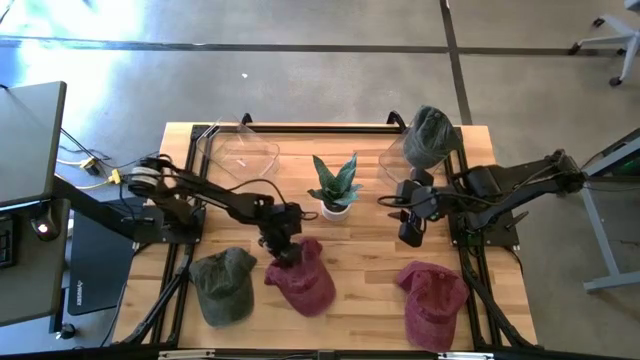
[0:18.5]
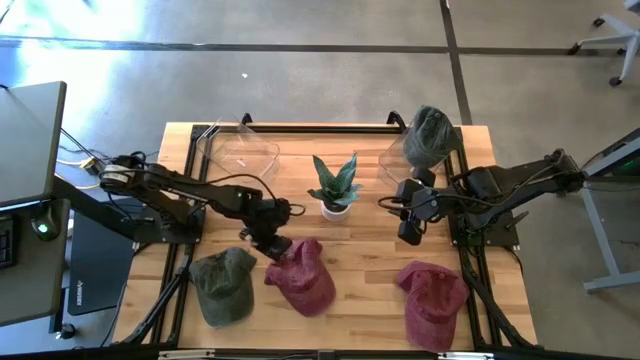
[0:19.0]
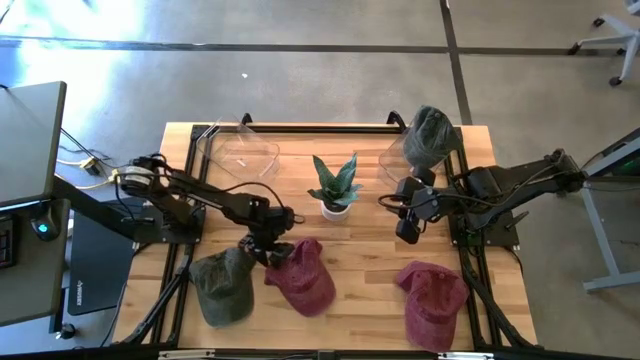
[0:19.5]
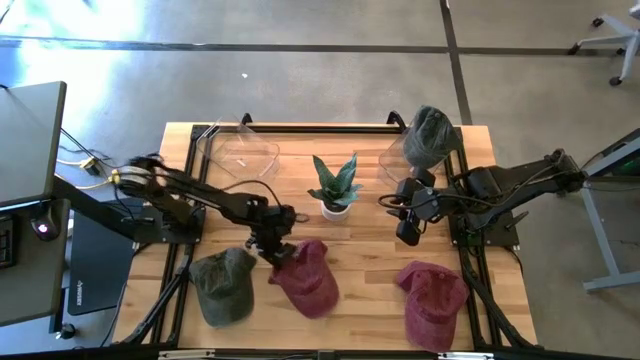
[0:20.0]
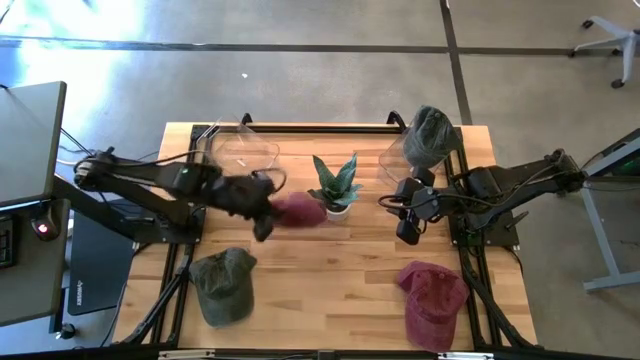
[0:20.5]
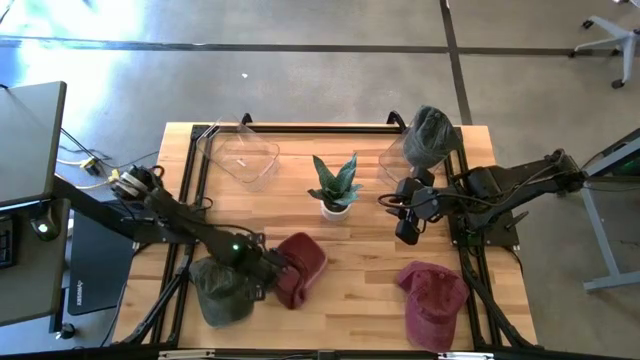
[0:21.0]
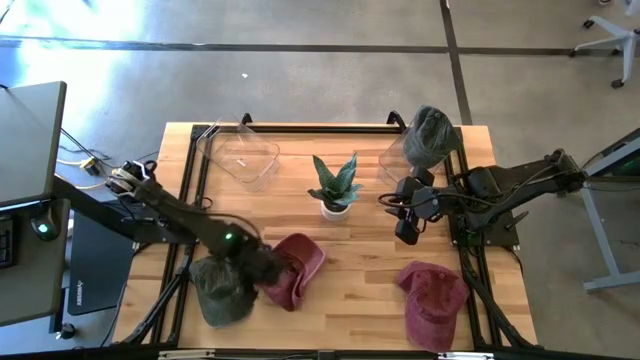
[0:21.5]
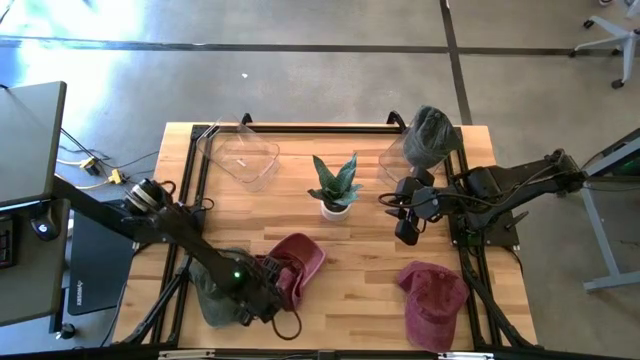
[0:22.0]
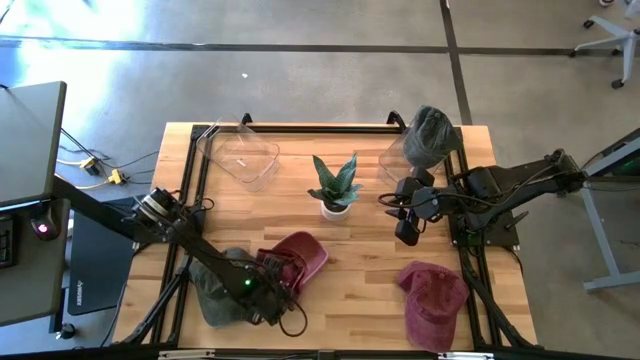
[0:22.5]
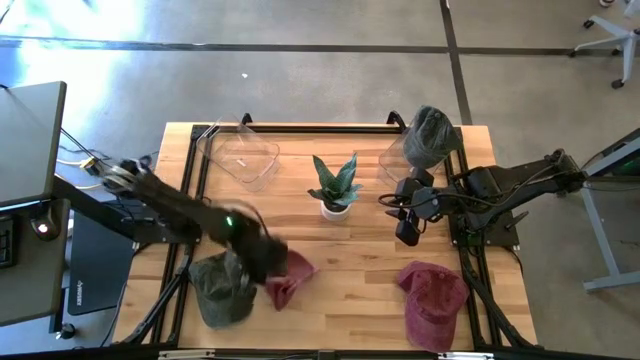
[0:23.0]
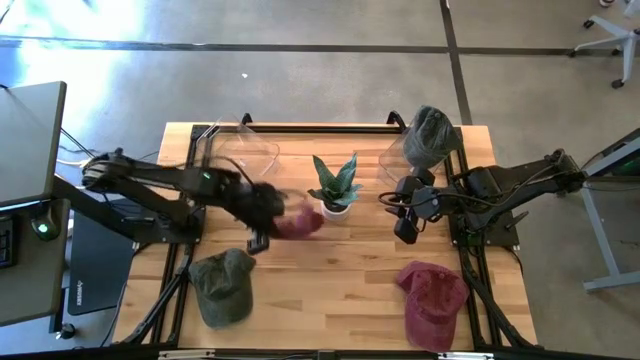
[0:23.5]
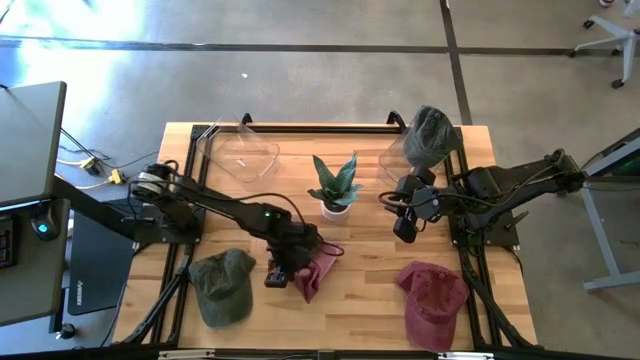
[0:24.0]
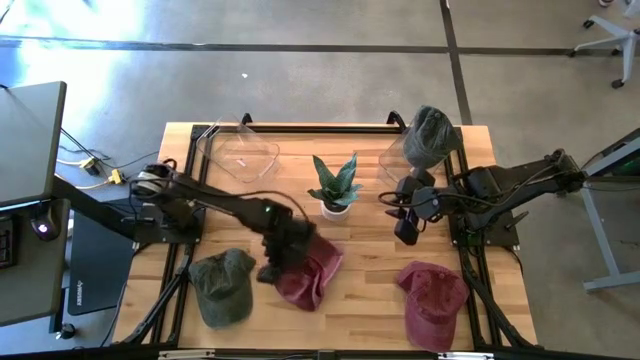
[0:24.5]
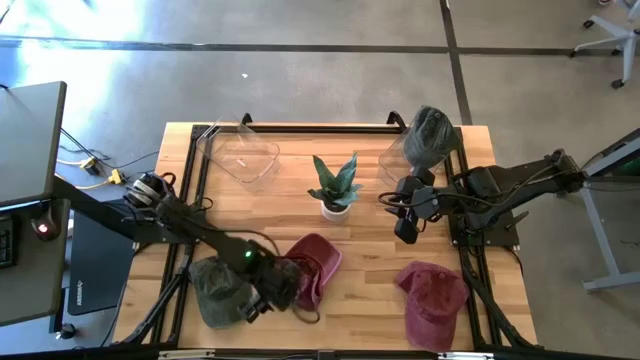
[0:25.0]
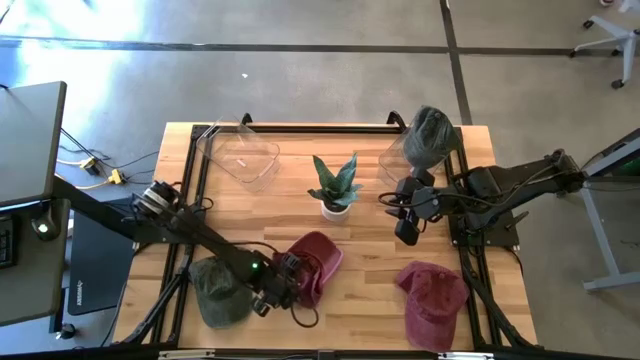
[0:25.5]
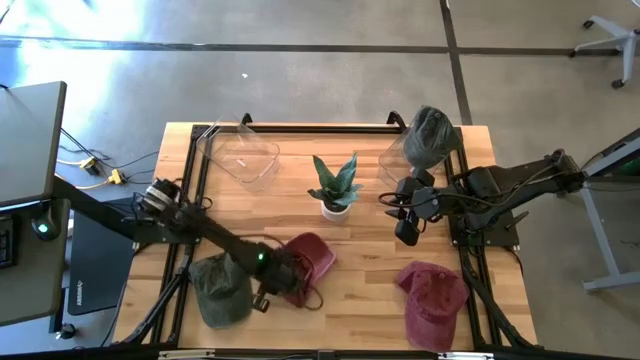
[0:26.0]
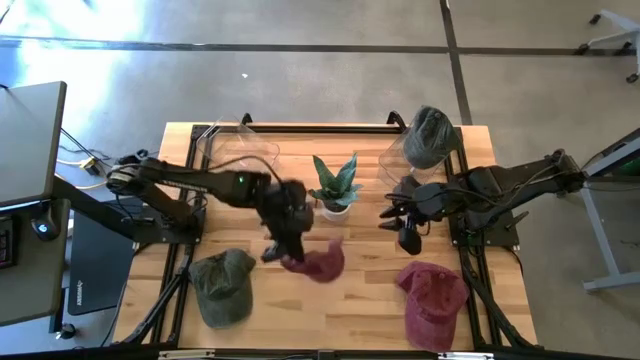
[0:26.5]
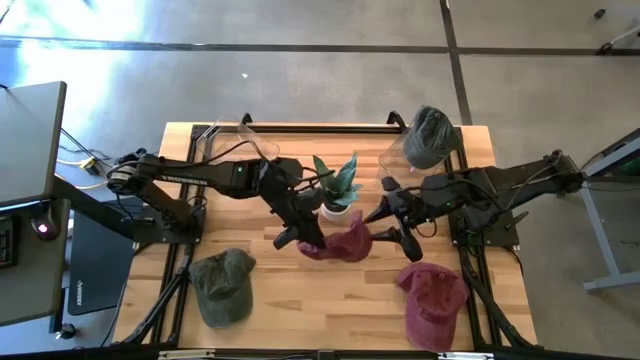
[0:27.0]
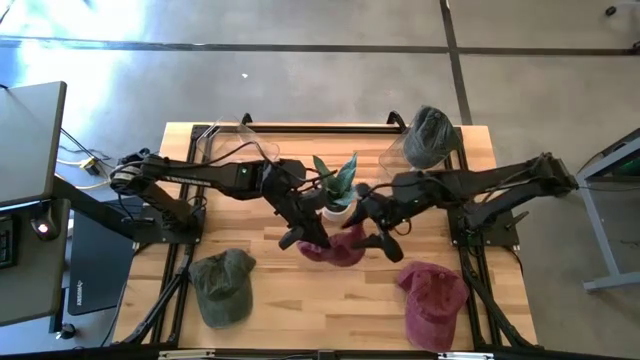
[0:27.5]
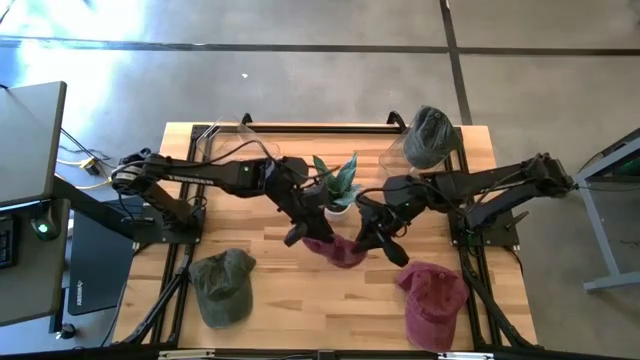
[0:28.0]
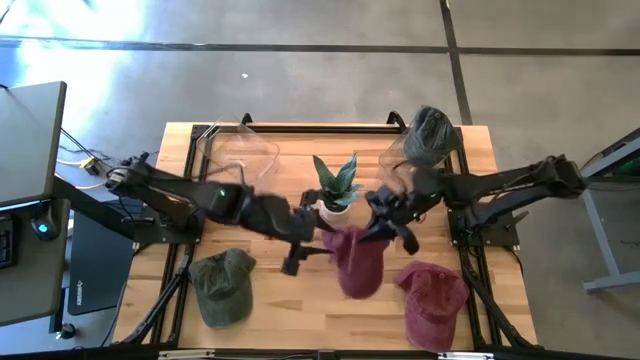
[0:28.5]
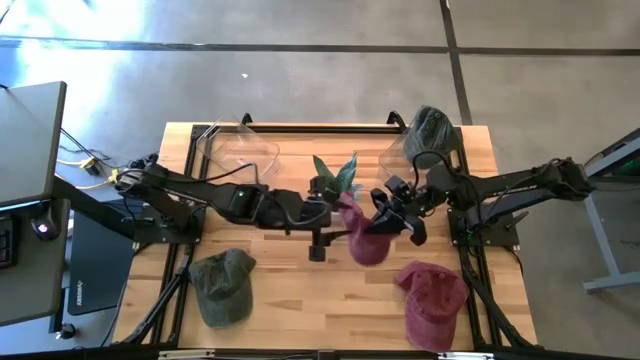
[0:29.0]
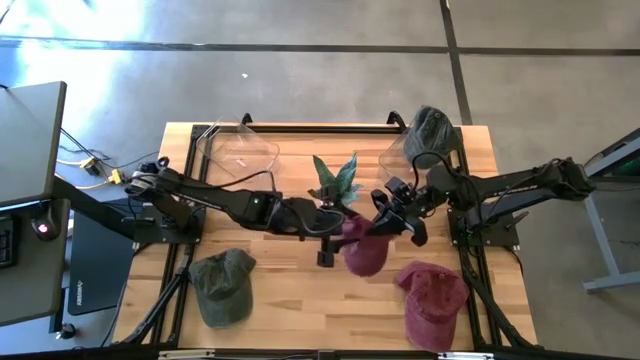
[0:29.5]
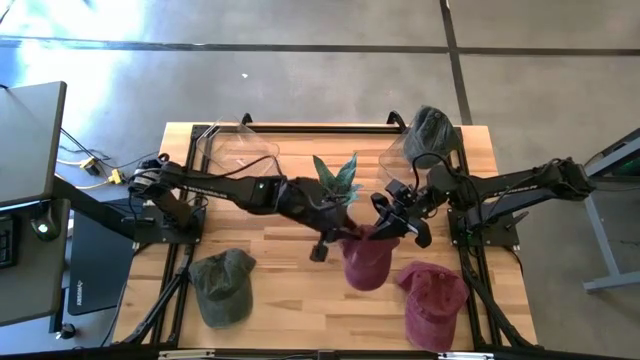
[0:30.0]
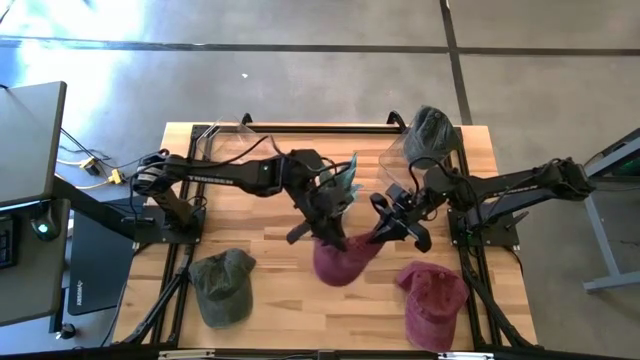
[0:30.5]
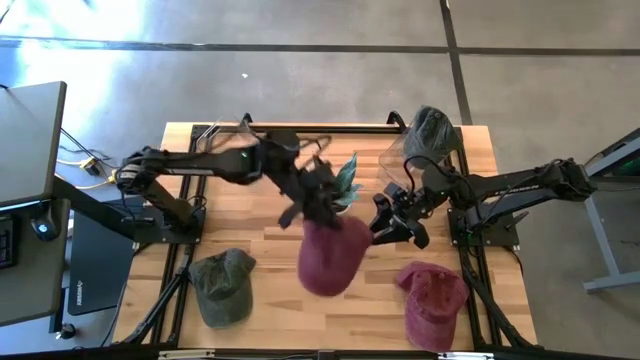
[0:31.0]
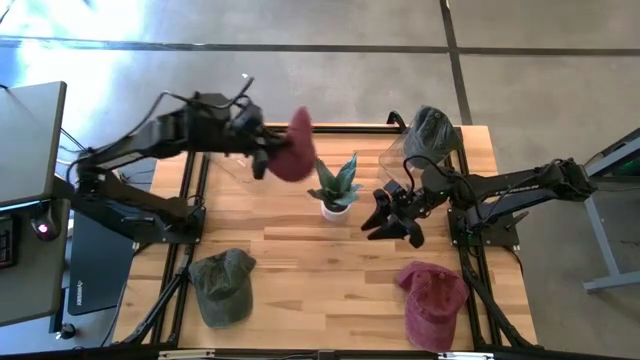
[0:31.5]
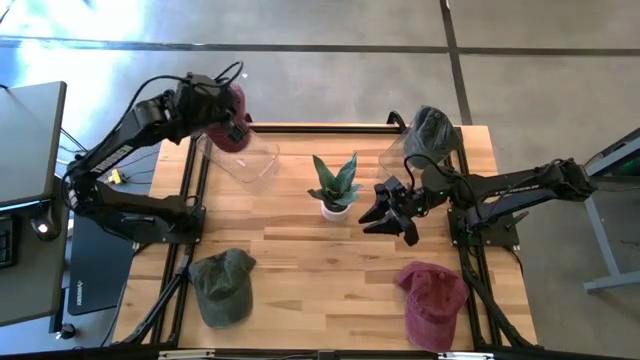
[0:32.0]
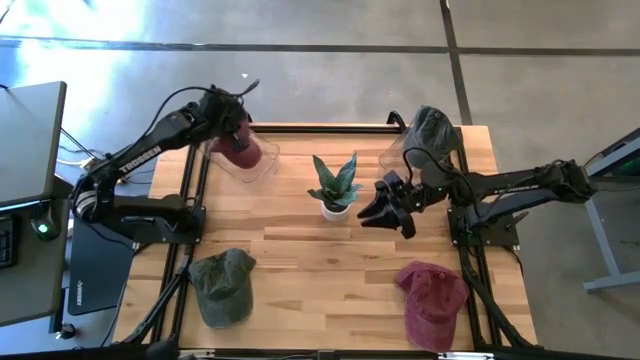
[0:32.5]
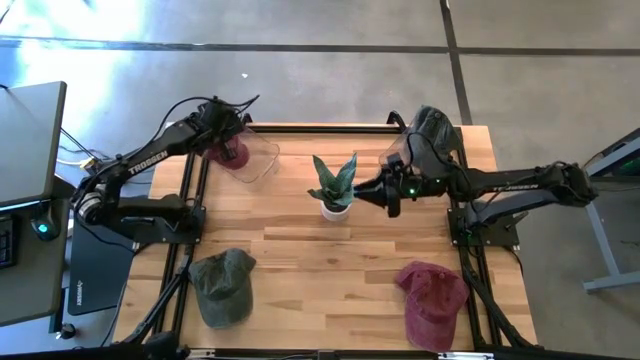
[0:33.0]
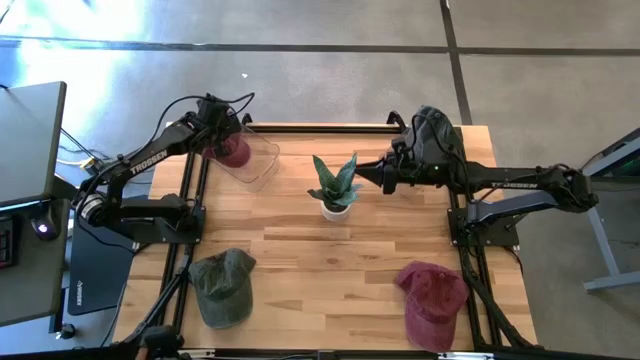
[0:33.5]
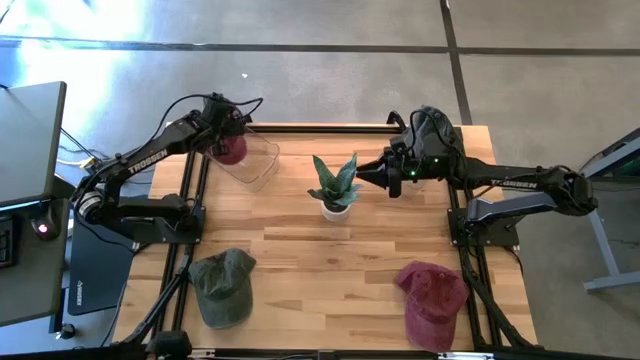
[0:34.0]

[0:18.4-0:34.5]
Task: Pick & Place hat
Put the left red cap into the left transparent bin

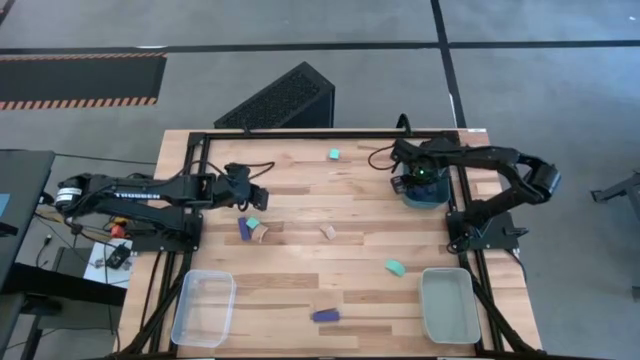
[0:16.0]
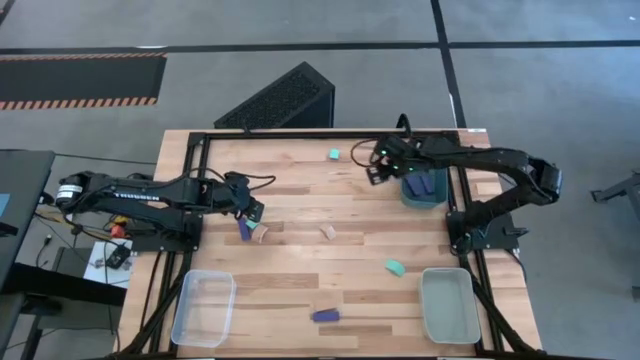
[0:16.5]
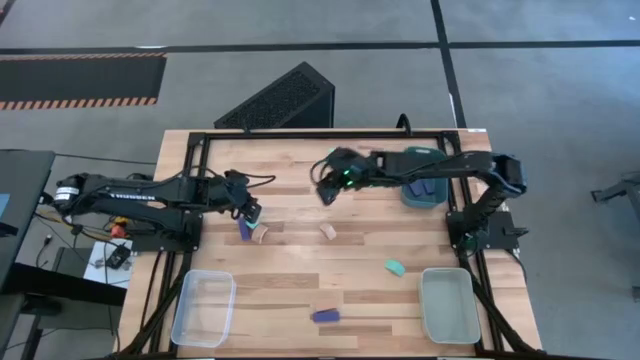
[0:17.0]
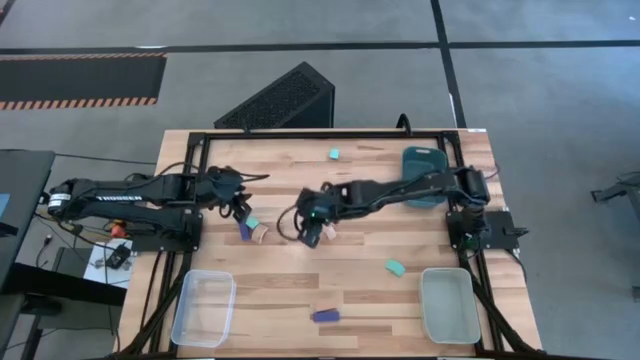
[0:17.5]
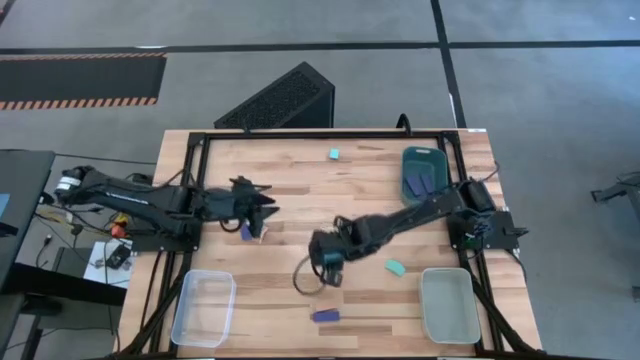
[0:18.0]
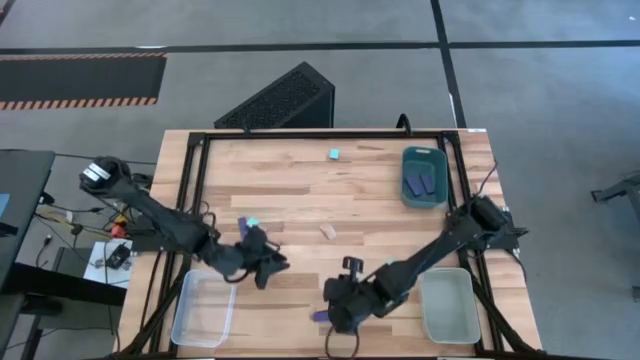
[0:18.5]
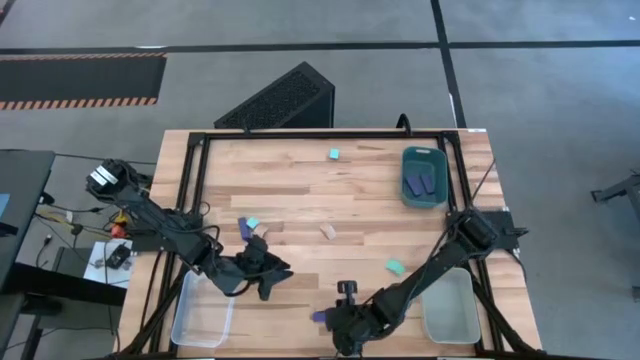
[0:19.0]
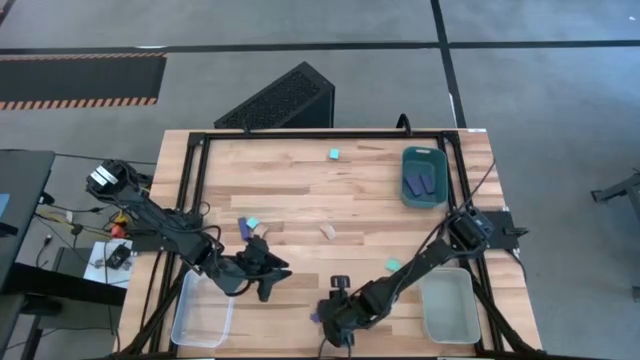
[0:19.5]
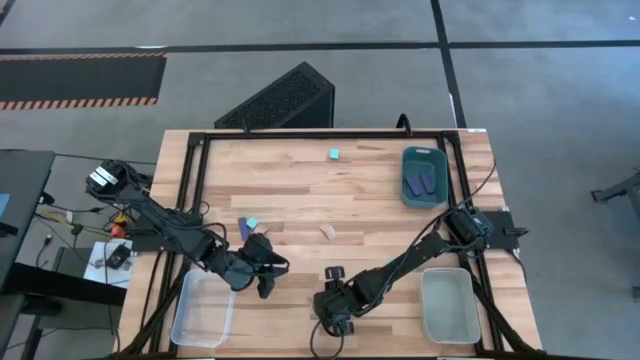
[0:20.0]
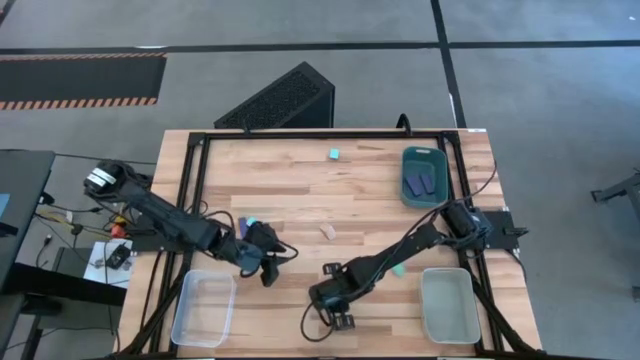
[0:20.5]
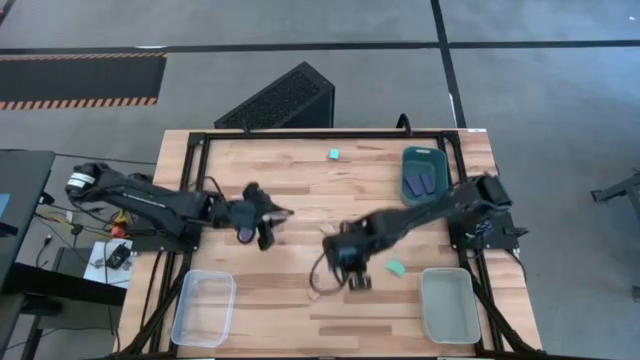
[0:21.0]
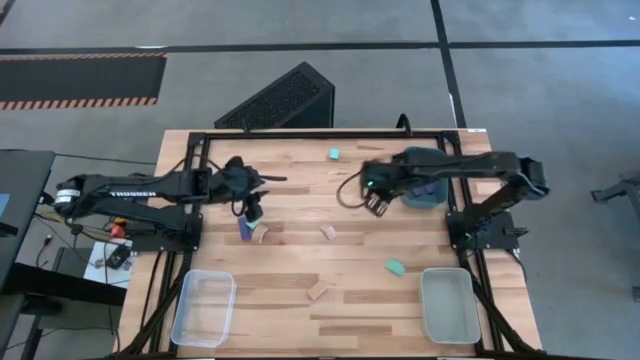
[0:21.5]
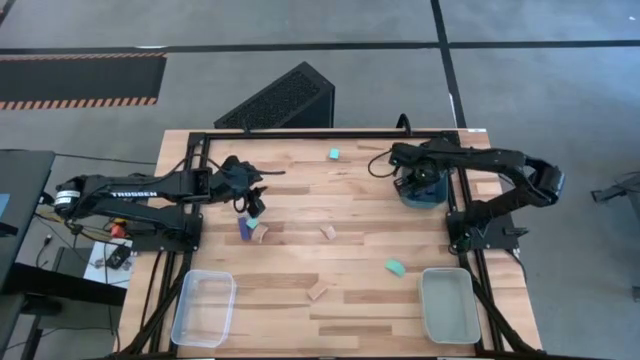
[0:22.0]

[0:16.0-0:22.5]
Task: Sort & place blocks by color
Put the blue block into the green bin
